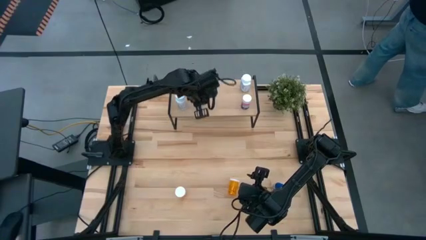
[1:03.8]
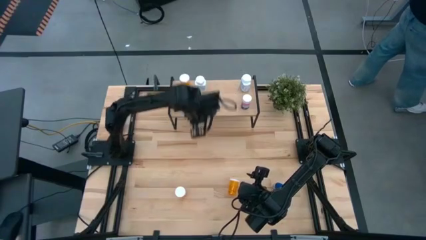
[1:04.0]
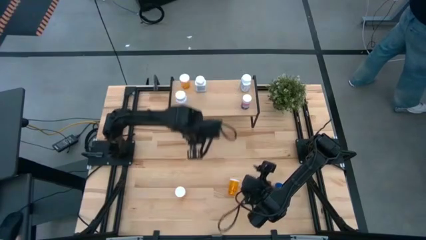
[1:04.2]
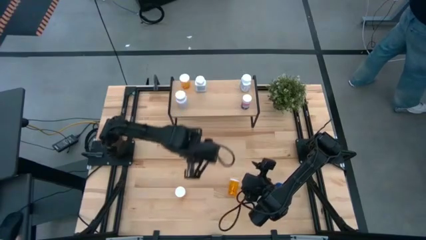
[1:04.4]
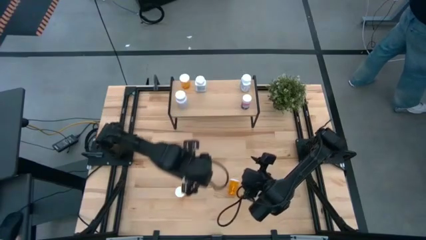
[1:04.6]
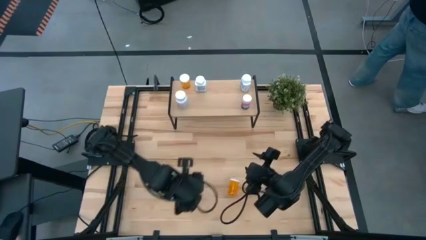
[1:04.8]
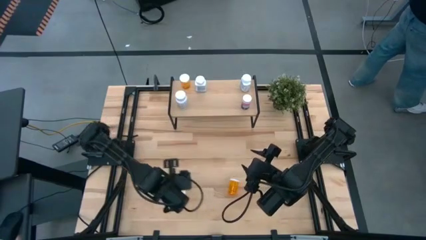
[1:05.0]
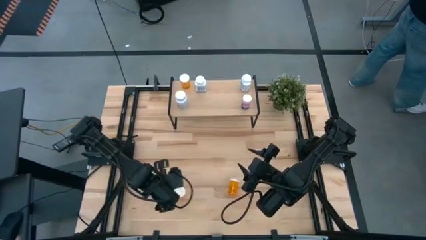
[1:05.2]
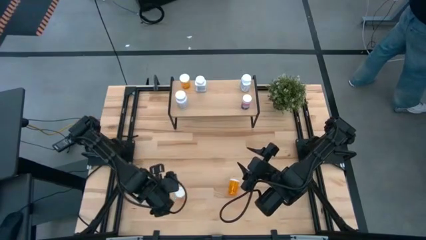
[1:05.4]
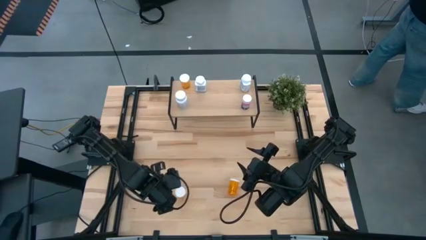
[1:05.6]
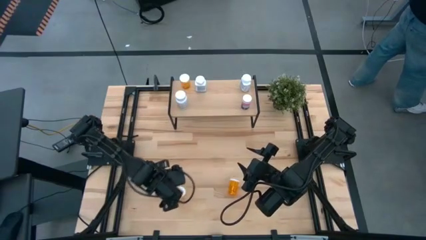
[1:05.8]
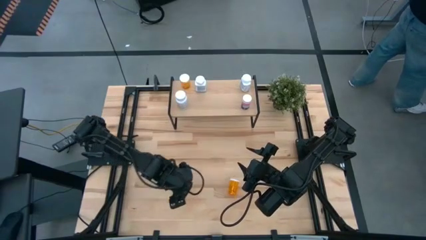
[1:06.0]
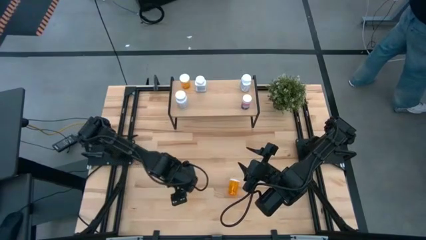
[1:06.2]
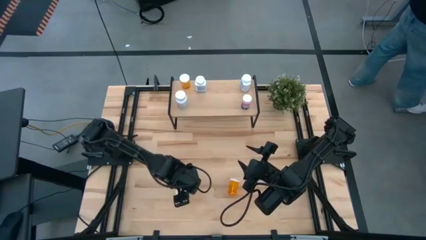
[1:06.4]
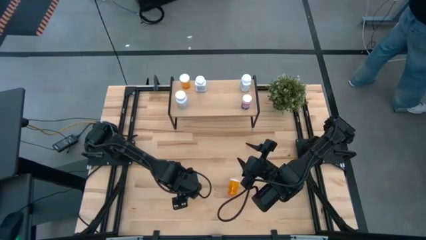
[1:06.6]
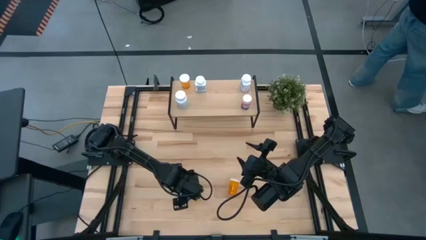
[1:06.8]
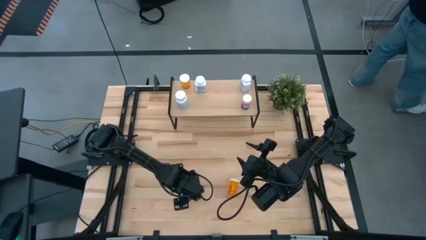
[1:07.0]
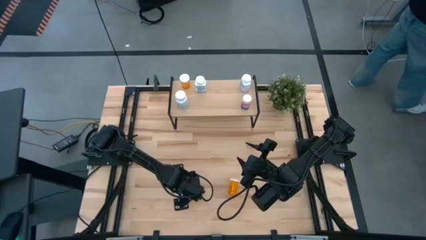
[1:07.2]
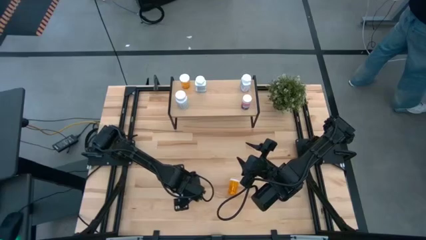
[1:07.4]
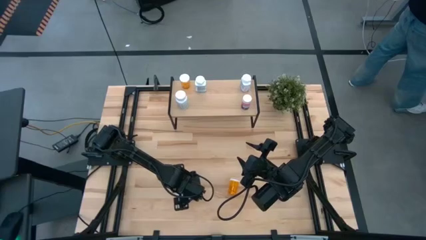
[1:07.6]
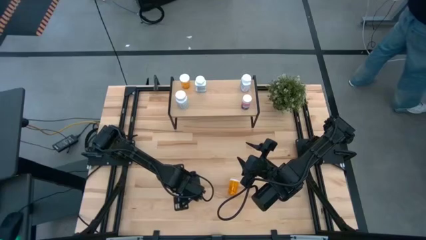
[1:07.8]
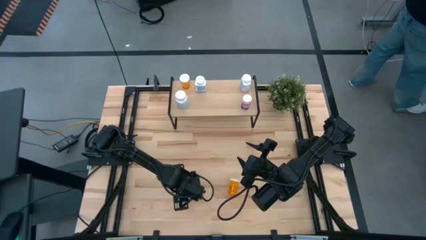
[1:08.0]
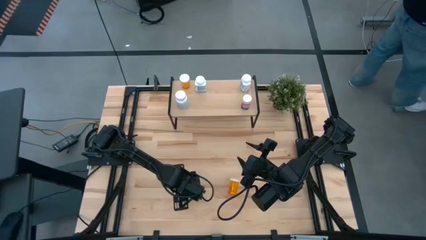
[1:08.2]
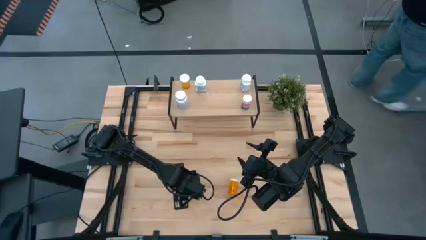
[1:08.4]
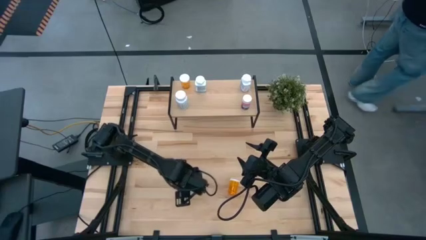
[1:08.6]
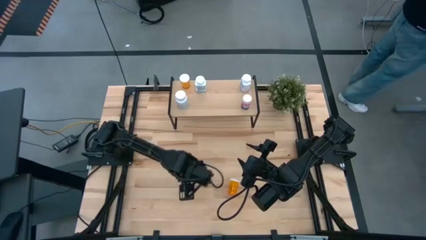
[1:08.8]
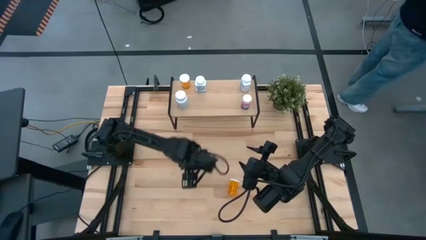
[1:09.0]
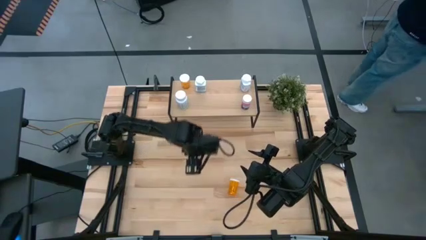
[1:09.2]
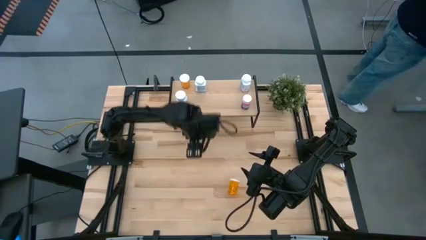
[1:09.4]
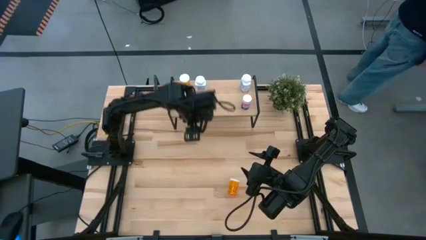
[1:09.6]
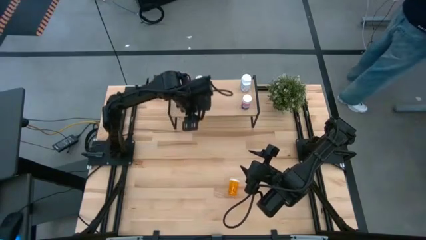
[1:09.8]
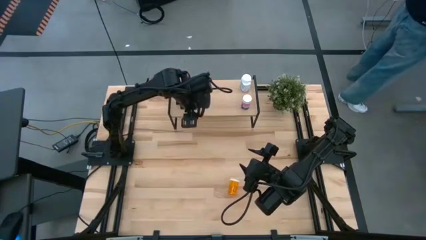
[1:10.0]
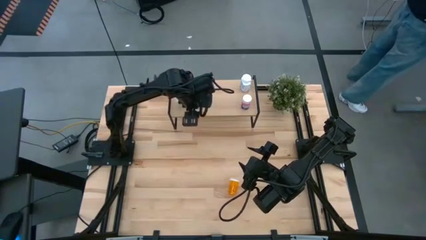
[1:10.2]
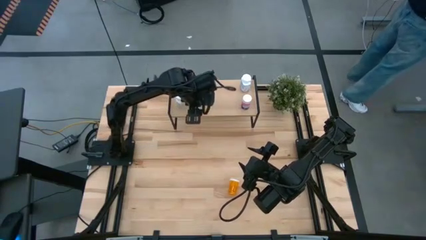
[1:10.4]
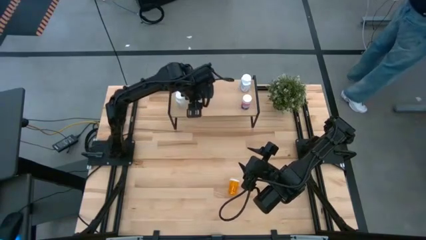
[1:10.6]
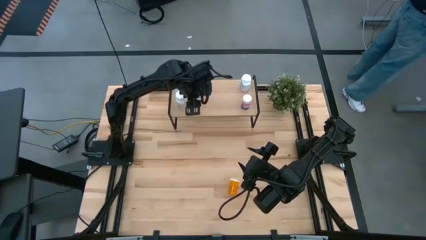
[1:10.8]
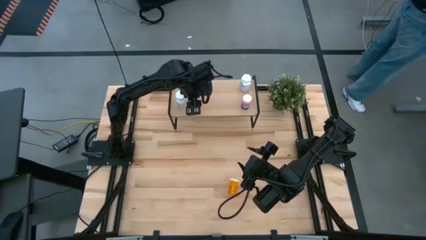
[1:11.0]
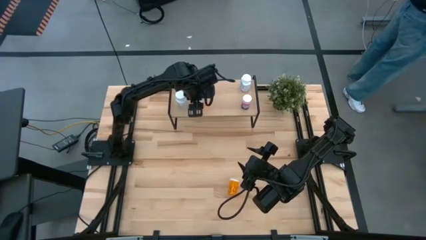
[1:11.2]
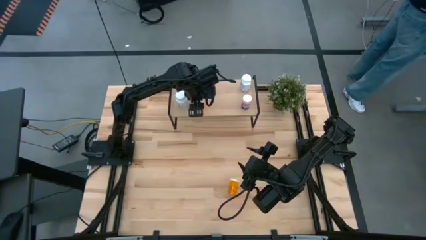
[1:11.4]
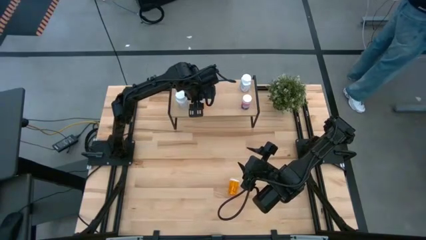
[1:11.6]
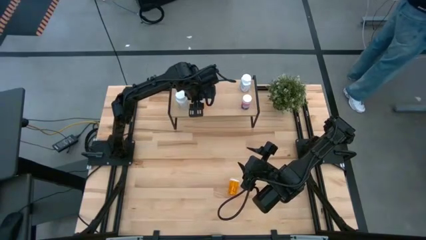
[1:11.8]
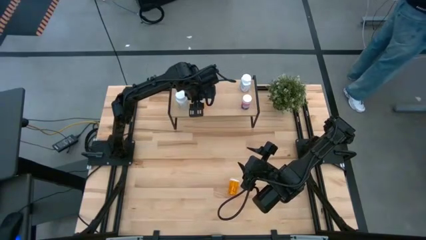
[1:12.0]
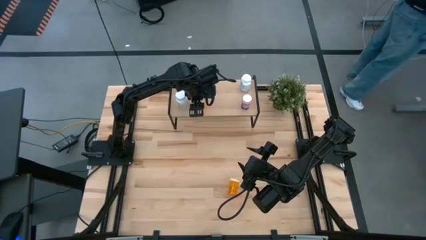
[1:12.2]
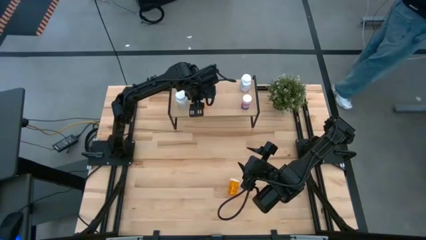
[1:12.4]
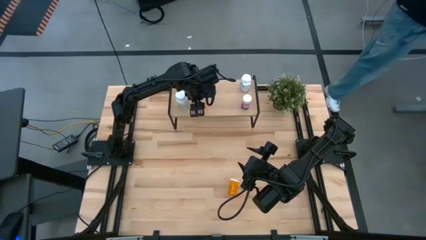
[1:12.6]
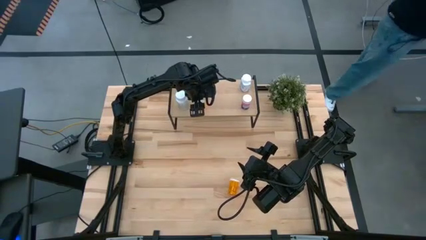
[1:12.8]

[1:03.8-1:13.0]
Task: Pick and place medicine bottles onto shelf by color
Put the left yellow pill bottle on the shelf

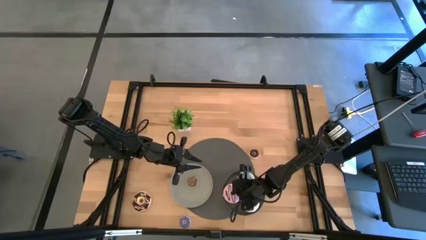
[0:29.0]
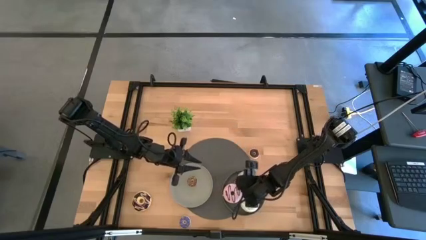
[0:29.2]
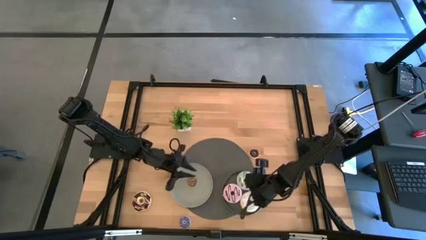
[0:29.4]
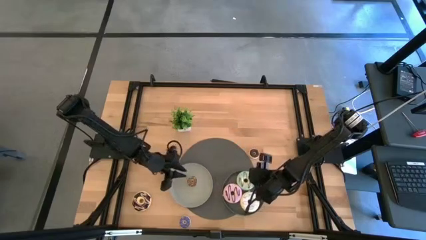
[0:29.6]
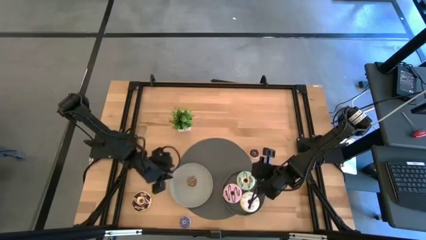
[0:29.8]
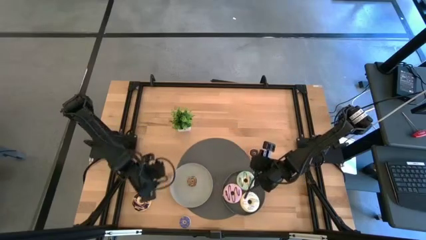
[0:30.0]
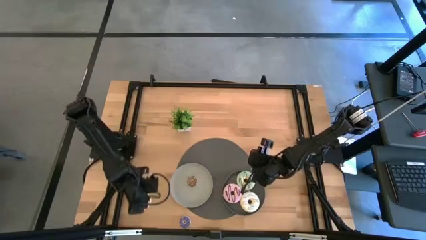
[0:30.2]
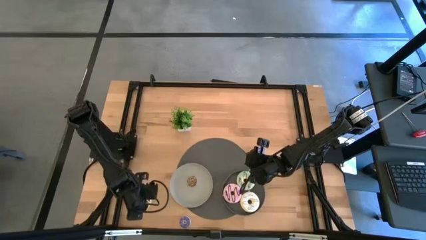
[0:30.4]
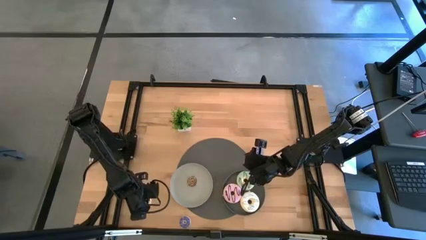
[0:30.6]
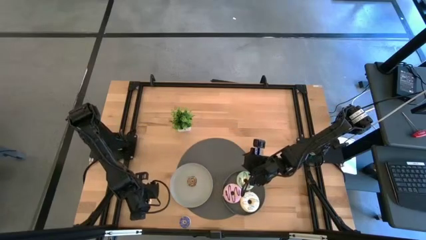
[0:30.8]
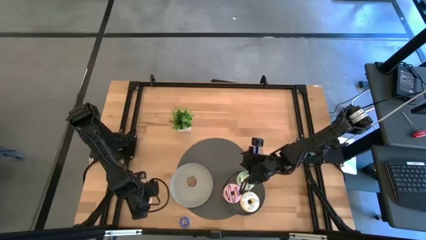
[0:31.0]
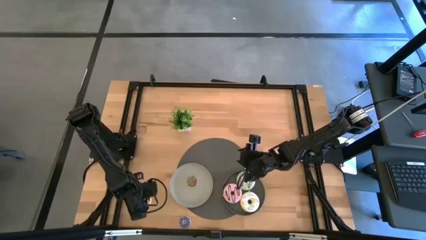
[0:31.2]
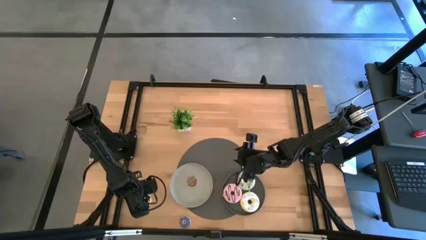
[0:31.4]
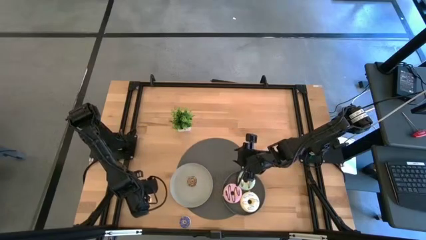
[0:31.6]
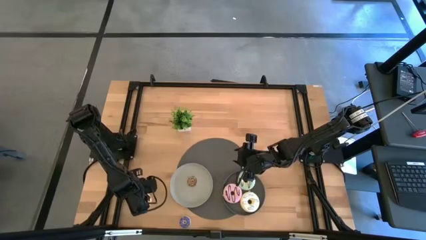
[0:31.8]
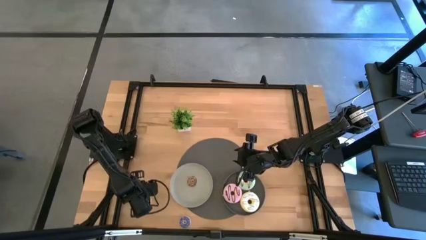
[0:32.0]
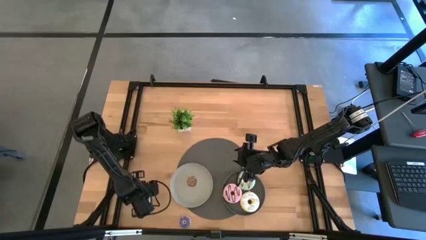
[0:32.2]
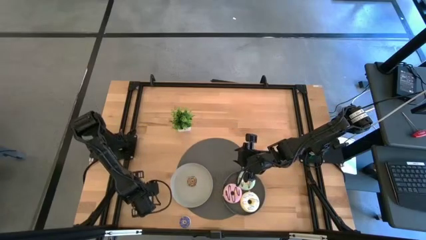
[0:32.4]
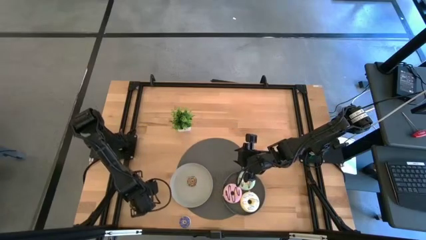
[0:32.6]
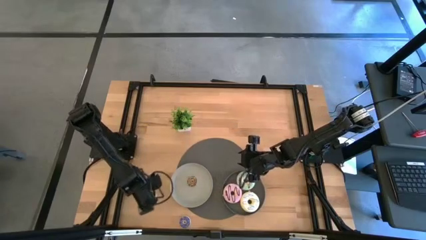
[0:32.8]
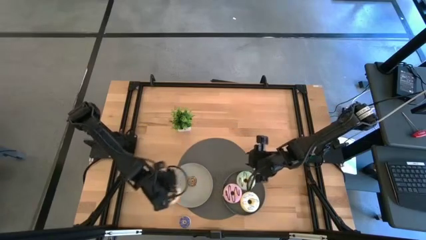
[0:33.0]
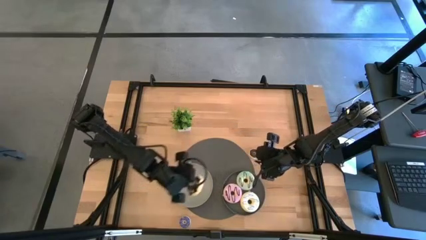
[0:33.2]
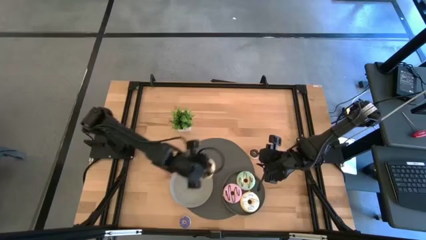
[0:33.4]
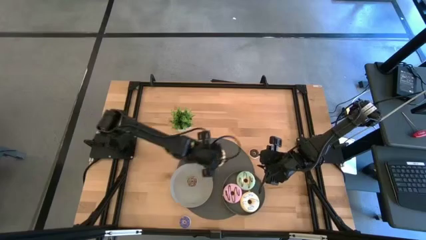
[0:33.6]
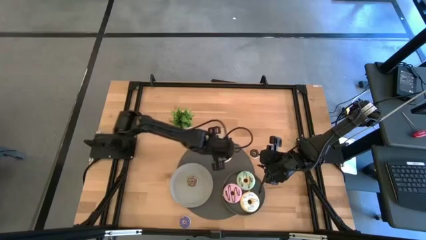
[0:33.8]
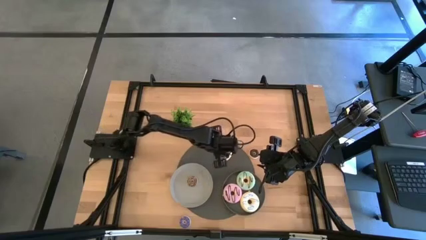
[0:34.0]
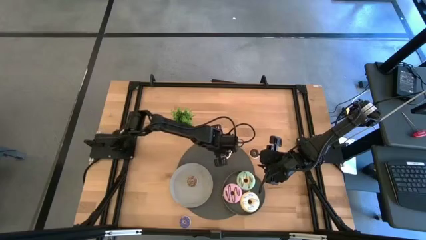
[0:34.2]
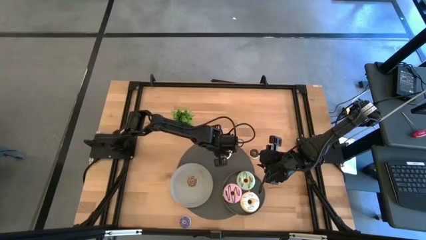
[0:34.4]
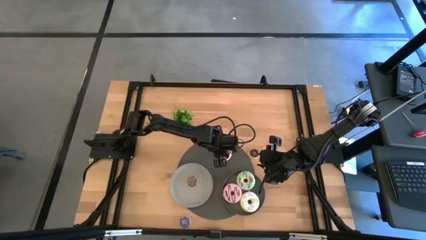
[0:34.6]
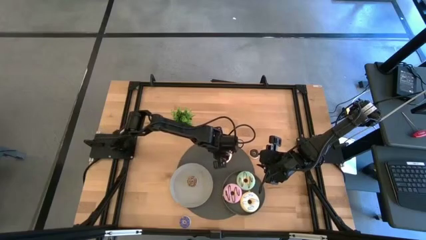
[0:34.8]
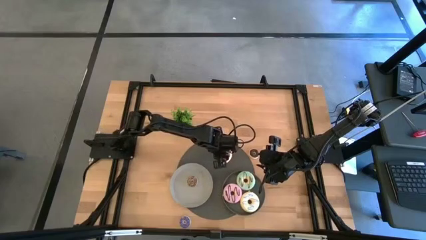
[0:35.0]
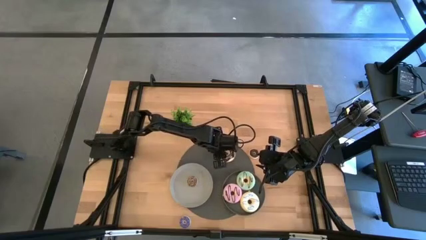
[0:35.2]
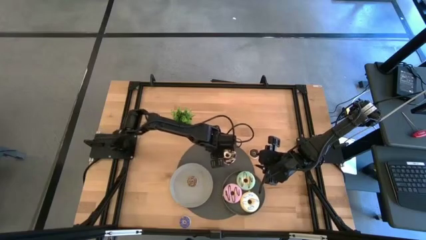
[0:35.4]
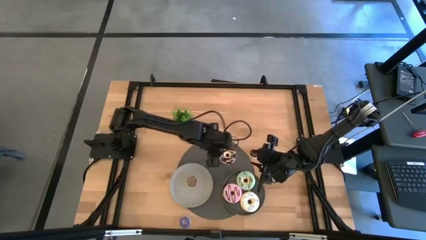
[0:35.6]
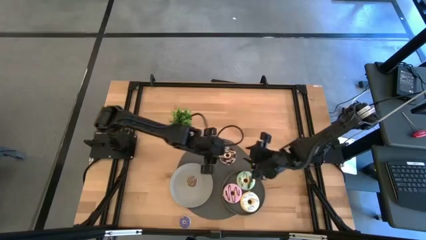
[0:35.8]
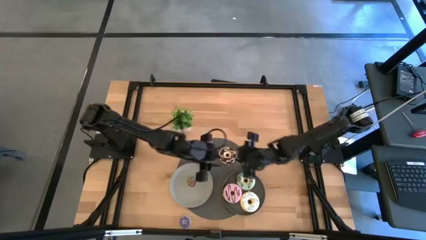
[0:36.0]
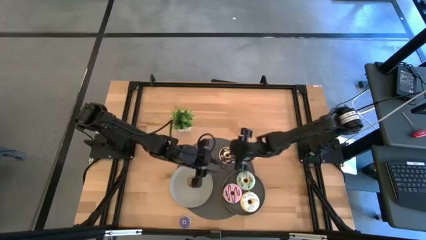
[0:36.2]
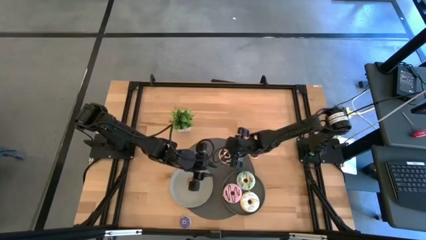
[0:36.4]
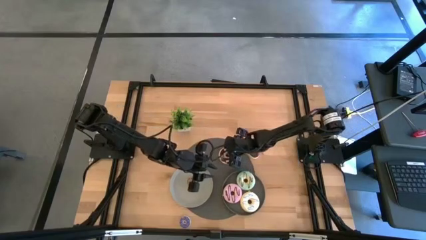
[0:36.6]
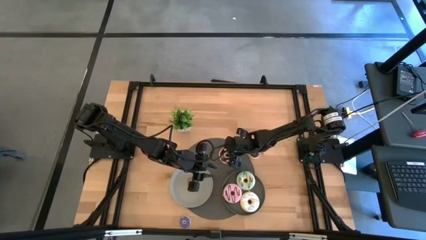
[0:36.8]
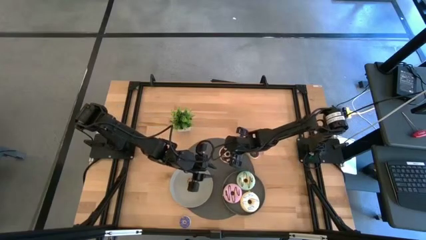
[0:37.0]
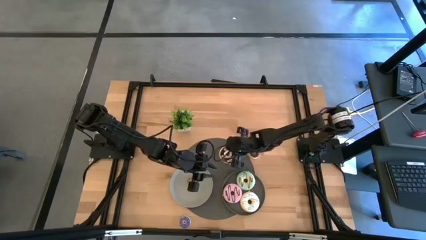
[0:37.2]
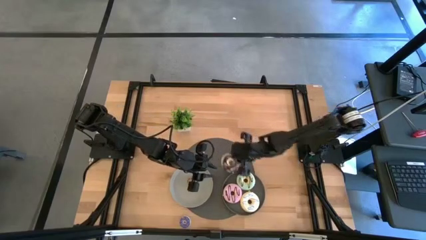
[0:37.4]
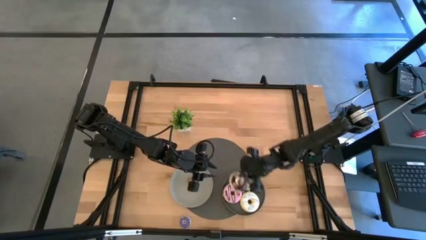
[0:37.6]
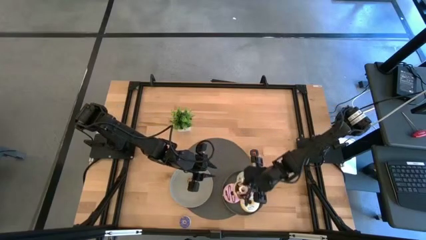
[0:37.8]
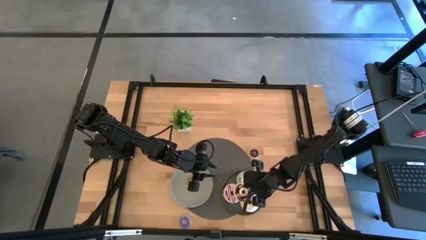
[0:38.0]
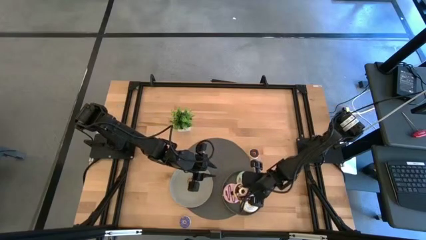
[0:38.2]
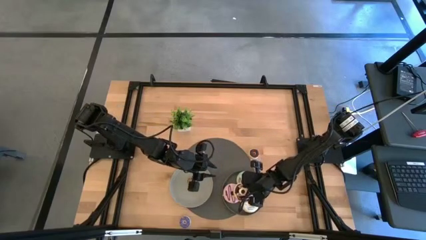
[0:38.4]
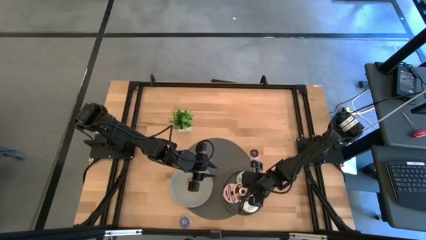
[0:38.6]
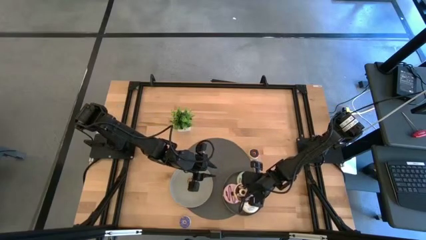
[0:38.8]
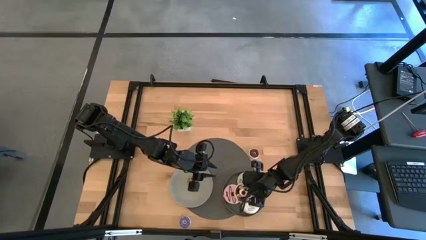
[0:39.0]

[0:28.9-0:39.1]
Task: Pick & Place donuts
Put the large black donut on the dark grey plate
